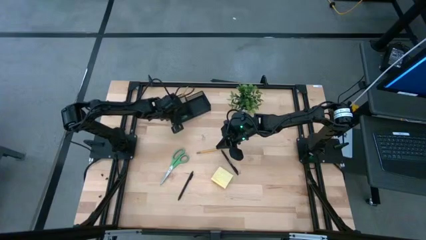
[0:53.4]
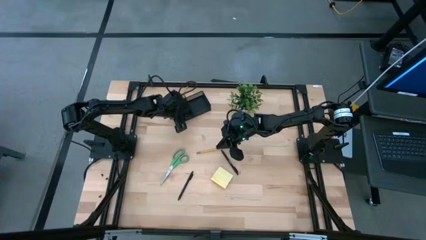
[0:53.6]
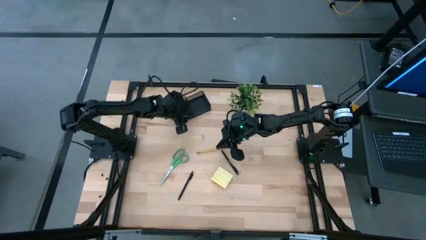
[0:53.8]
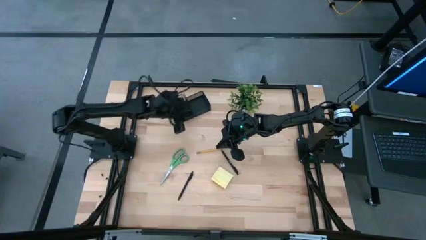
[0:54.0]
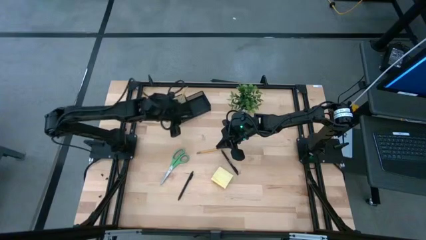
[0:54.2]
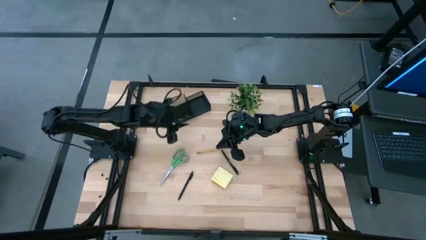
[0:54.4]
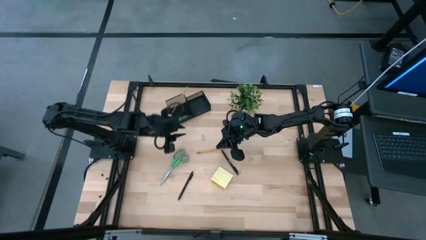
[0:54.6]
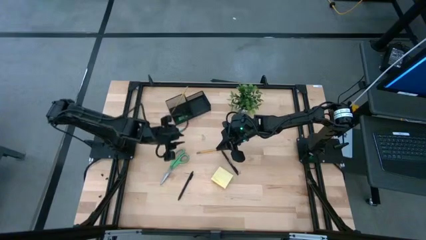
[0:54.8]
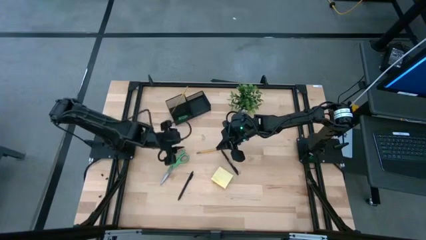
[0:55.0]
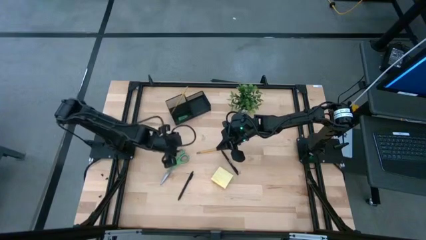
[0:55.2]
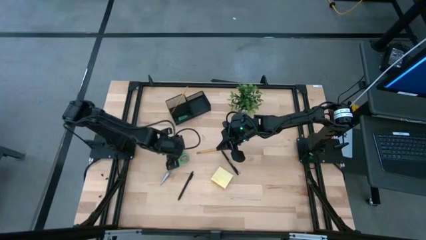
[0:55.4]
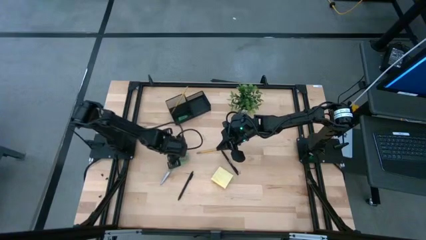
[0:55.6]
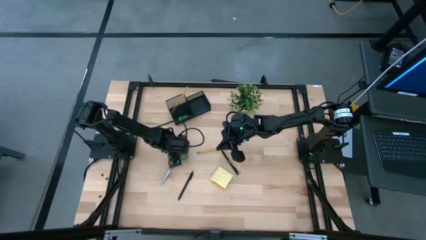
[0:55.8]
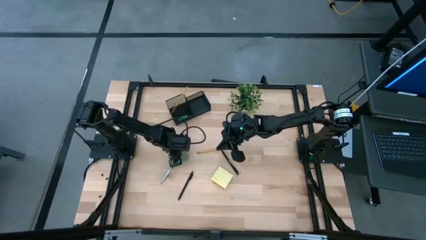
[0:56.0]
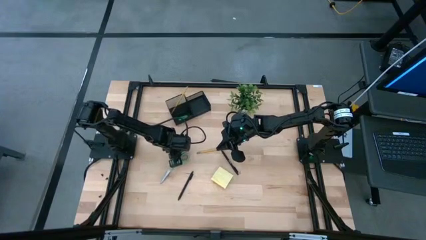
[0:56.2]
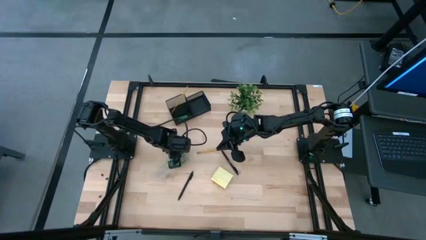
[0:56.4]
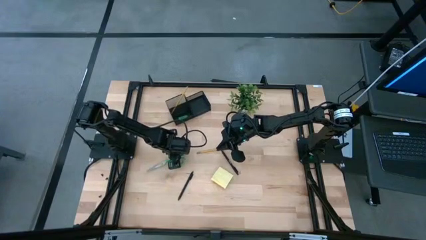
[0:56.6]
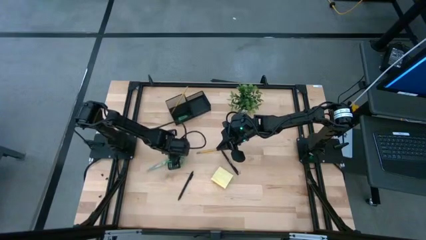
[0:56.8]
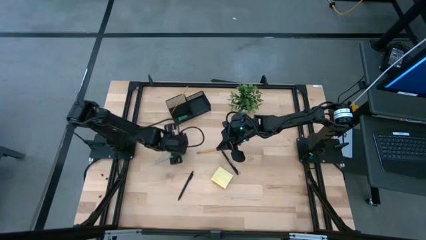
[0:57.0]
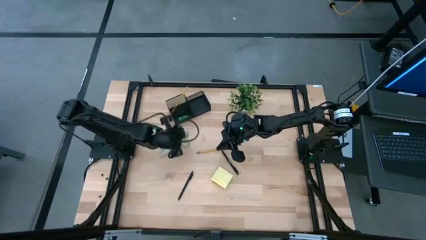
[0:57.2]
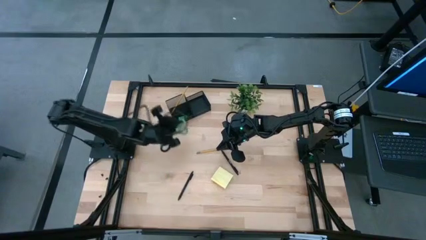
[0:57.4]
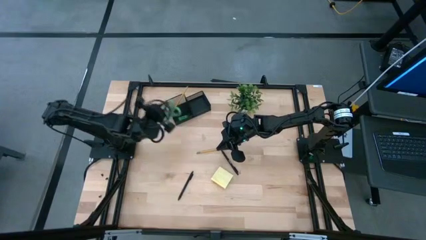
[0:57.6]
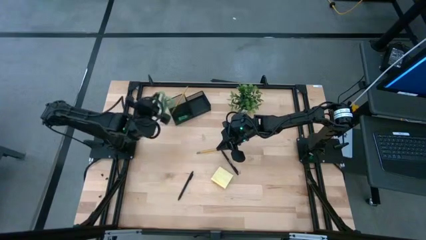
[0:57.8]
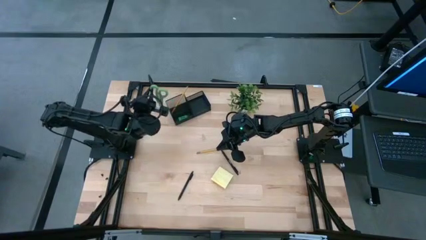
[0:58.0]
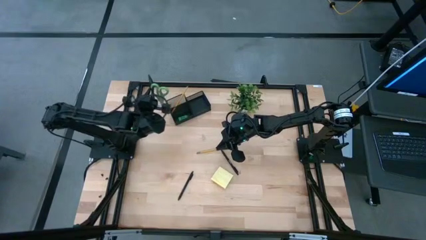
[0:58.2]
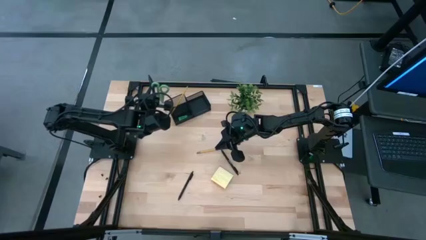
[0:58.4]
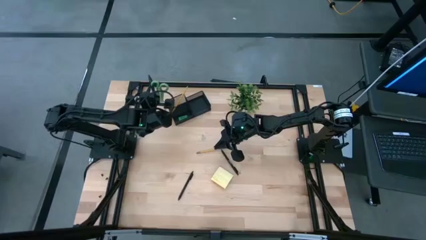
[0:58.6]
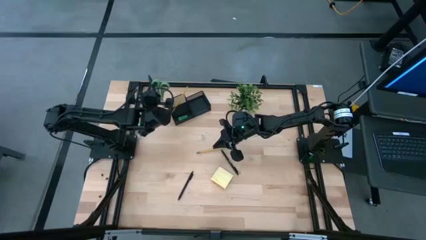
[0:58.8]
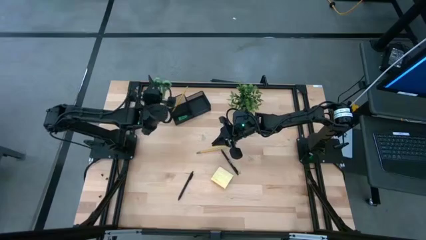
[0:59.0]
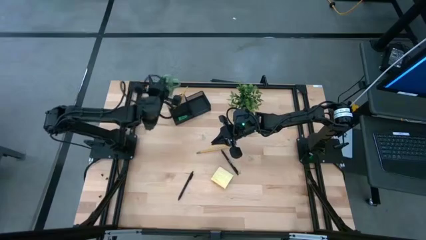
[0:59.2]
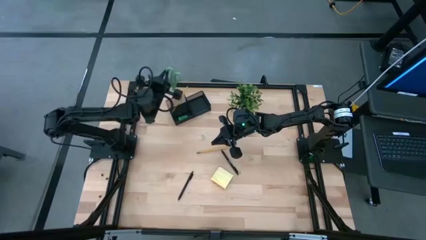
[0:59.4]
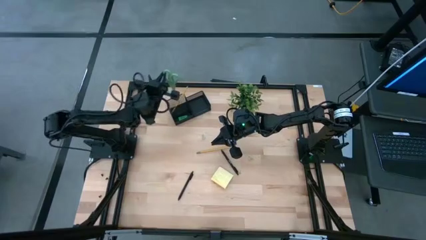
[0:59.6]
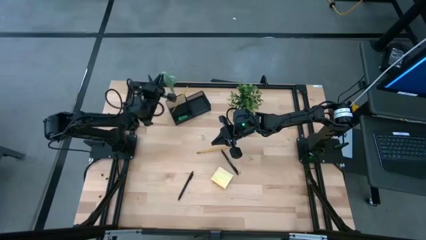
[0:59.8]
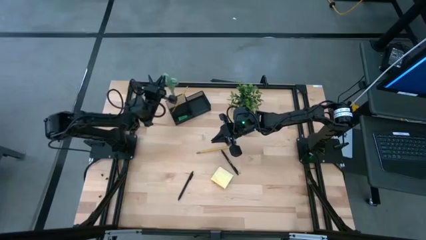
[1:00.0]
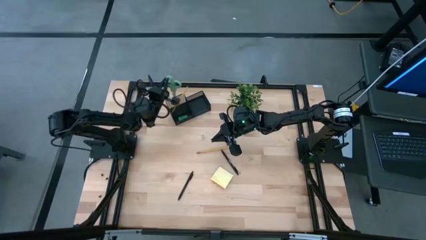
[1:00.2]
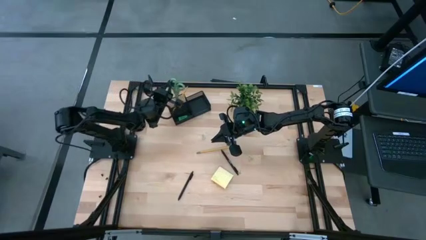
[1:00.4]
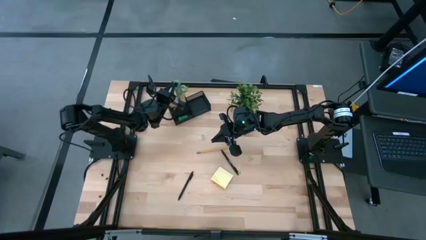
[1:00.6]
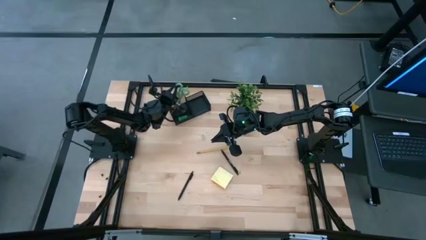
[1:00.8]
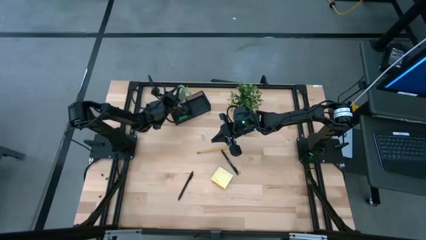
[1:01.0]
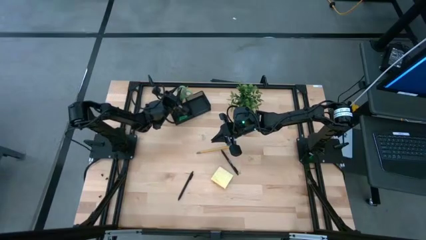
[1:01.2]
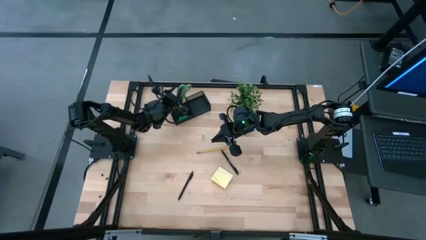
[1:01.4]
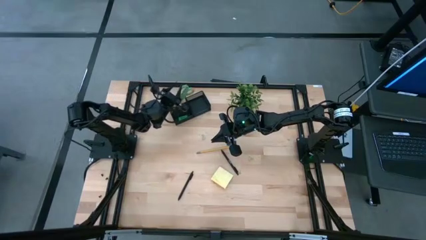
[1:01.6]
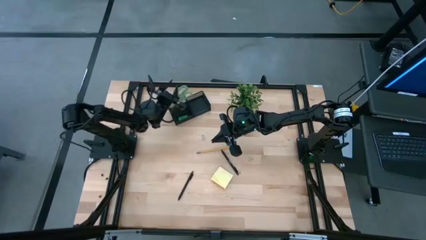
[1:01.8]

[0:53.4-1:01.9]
Task: Pick and place office supplies into organizer
Put the scissor into the desk organizer
